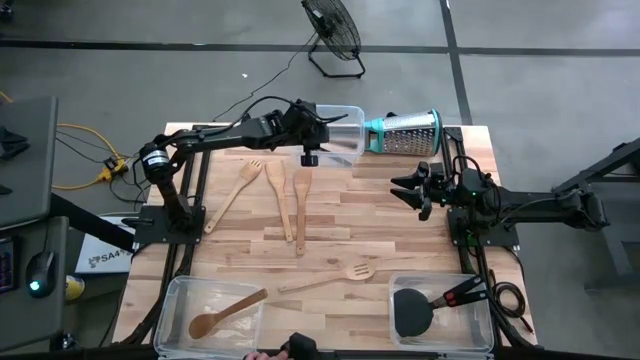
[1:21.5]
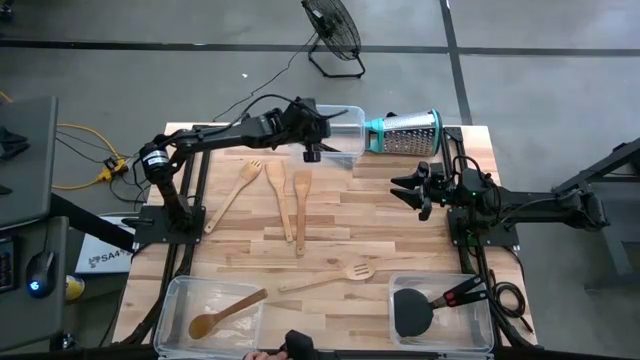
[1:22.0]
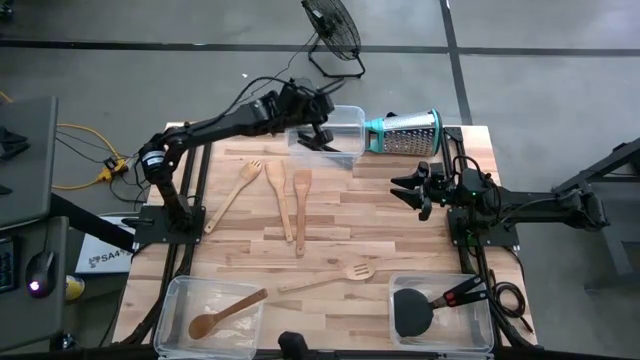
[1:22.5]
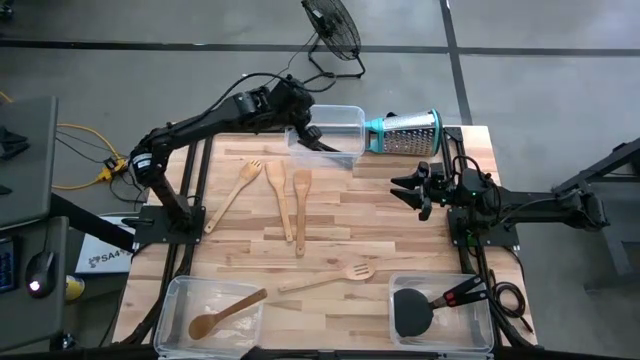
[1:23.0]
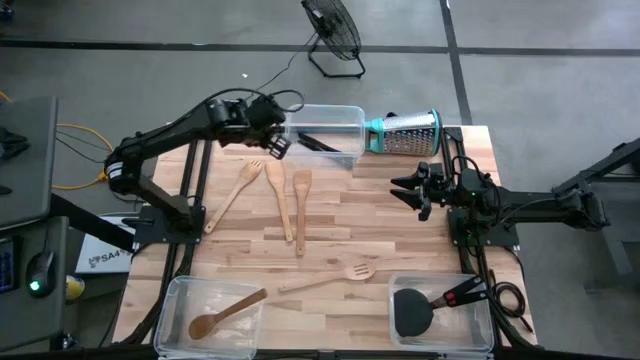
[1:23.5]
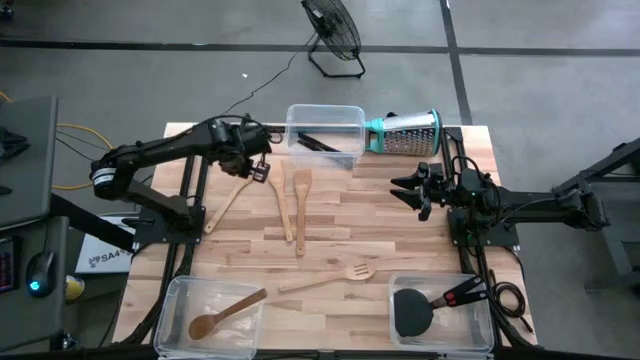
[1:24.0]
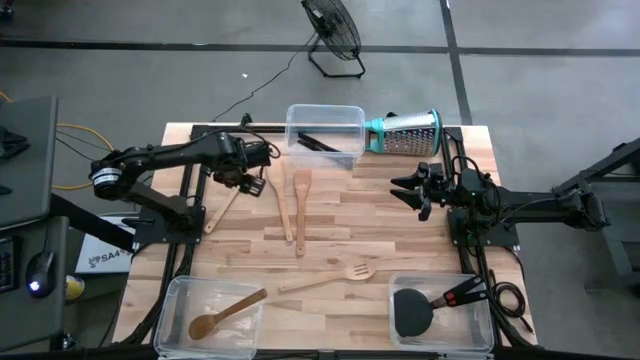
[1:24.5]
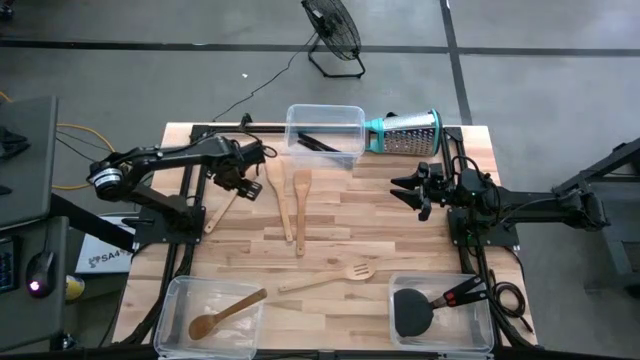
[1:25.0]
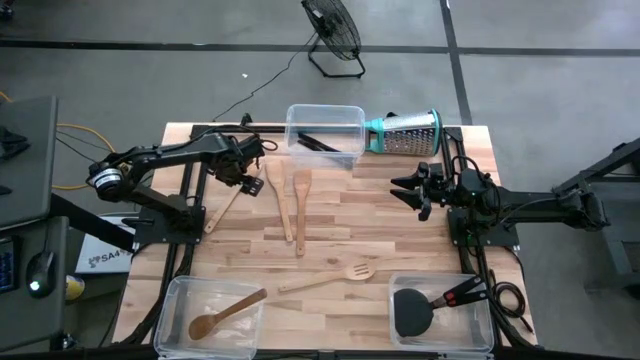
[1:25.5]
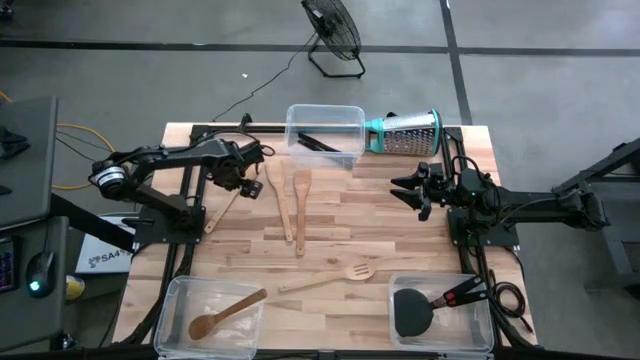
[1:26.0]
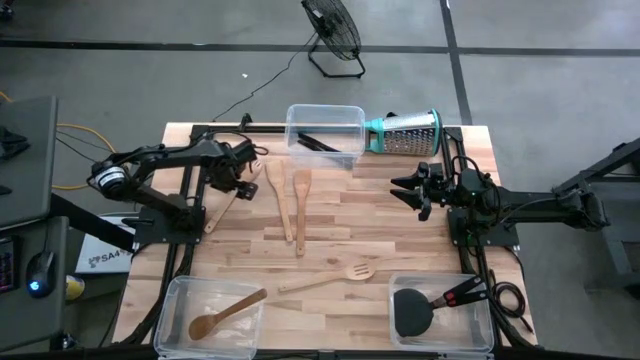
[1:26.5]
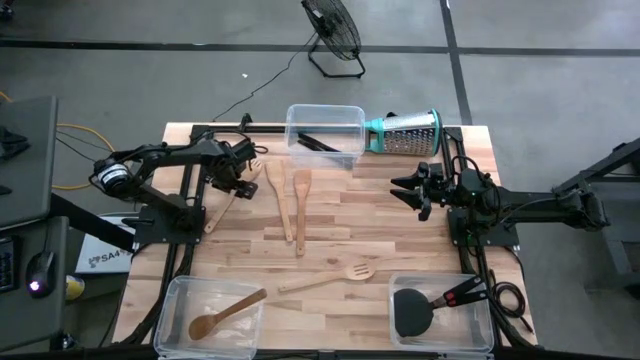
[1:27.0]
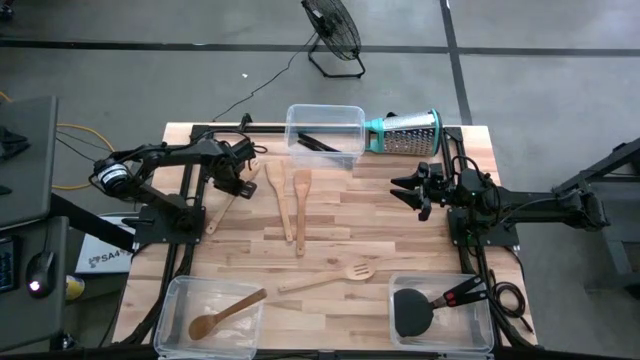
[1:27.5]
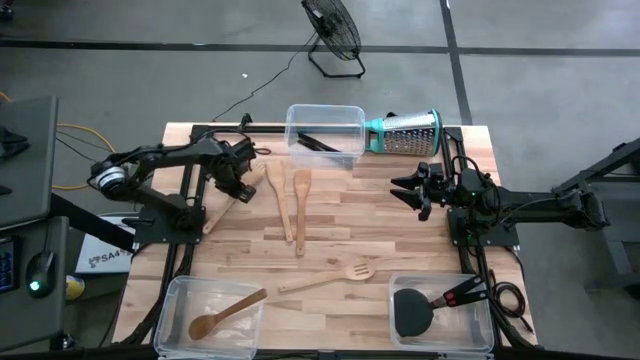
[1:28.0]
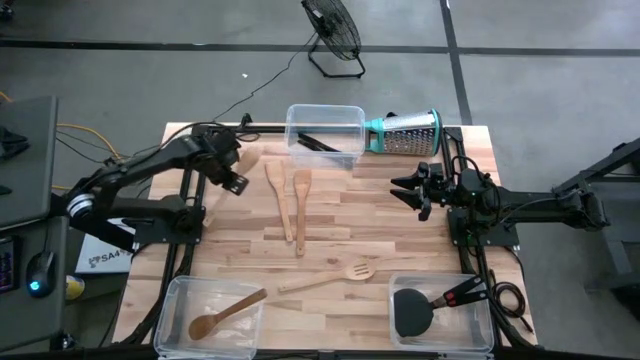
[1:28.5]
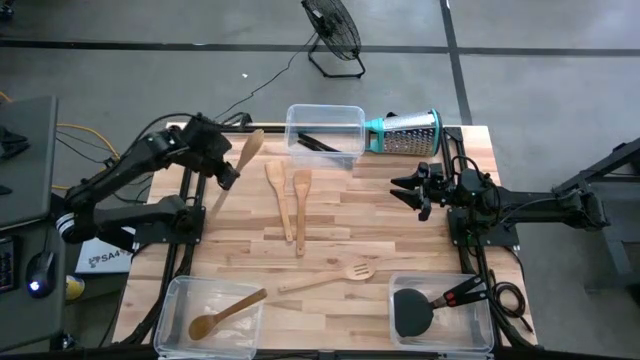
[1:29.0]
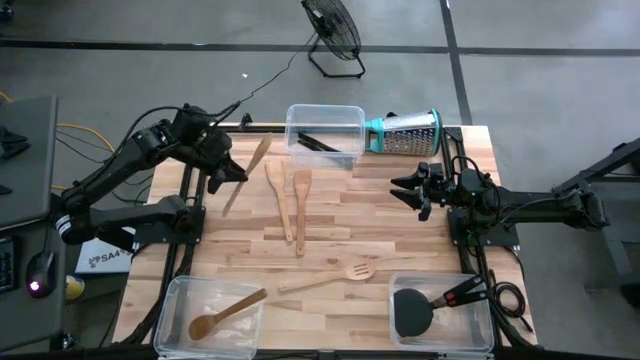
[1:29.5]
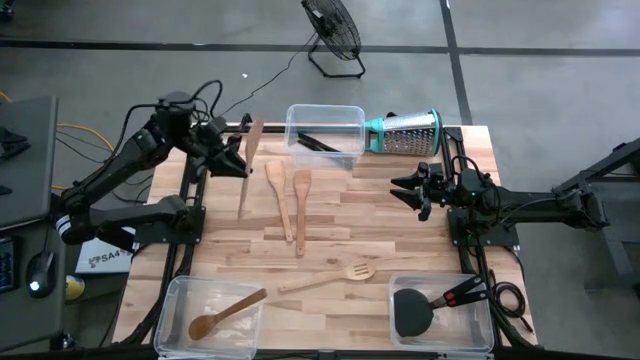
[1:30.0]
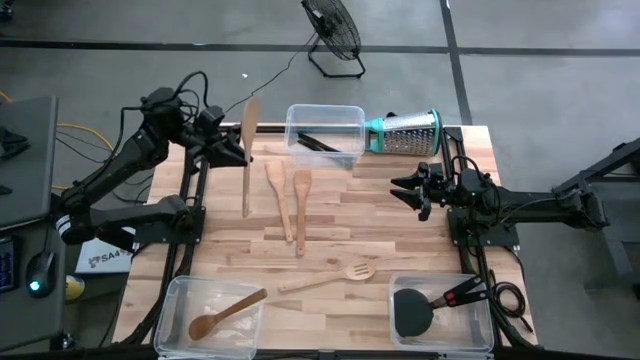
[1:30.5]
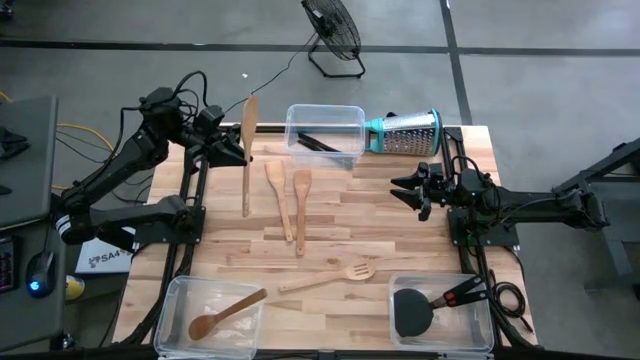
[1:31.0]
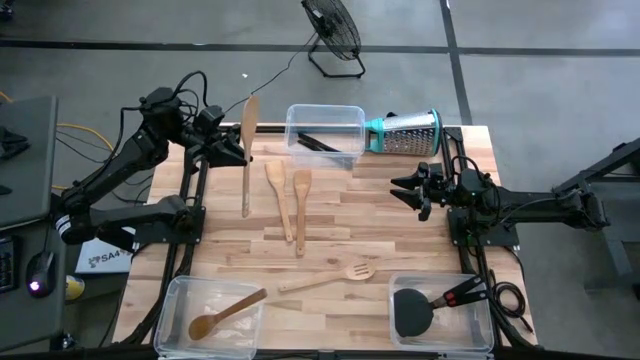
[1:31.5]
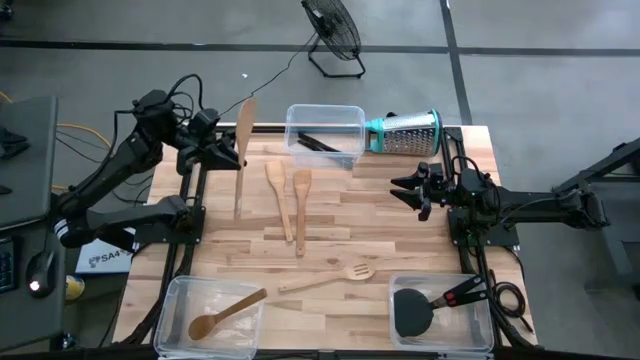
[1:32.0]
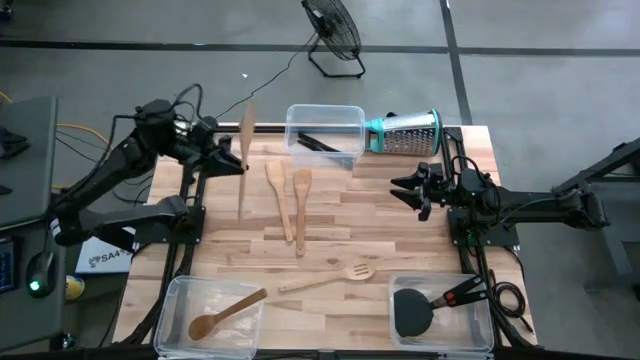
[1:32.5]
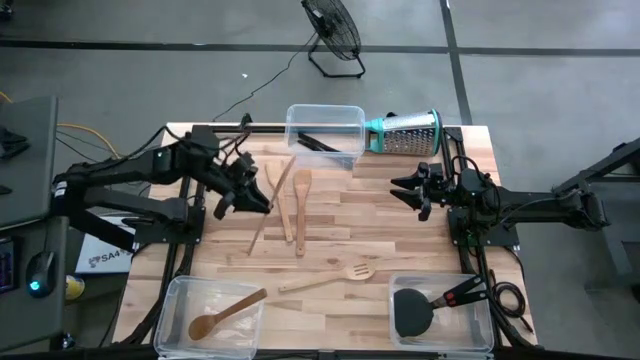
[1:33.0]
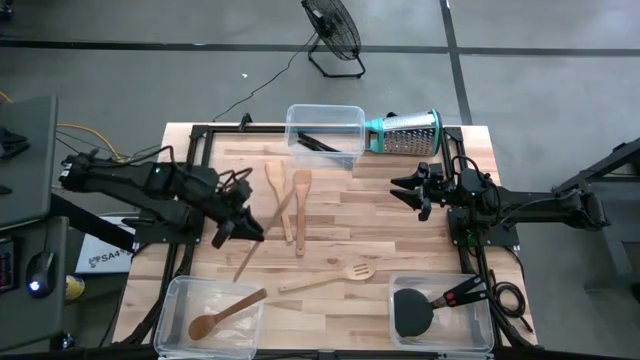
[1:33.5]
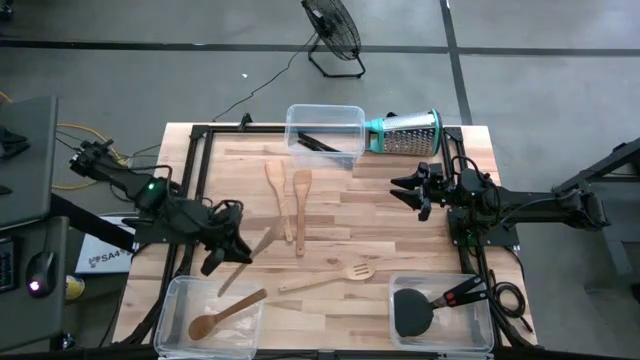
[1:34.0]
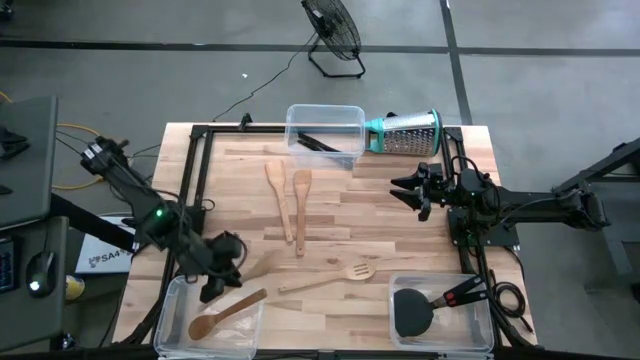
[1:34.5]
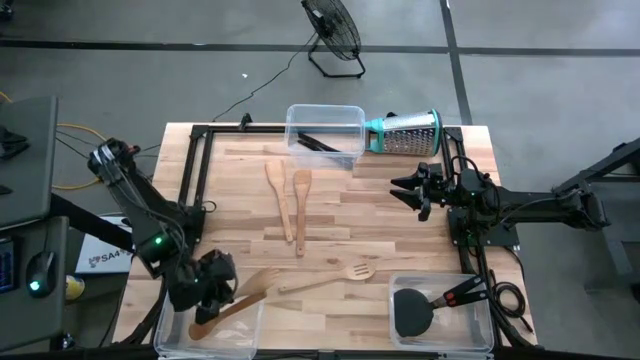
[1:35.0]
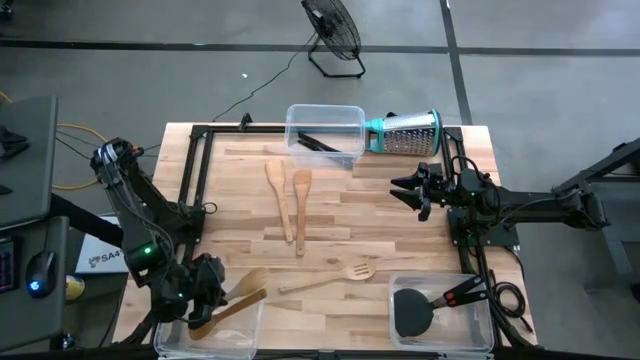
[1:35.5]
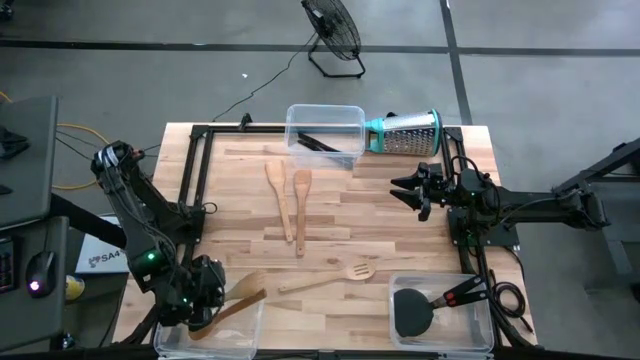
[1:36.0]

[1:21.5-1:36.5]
Task: Pick & Place Kitchen Items
Put the brown serving spoon into the bottom left transparent bin

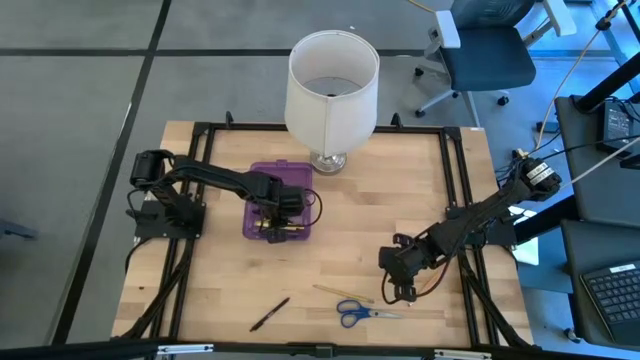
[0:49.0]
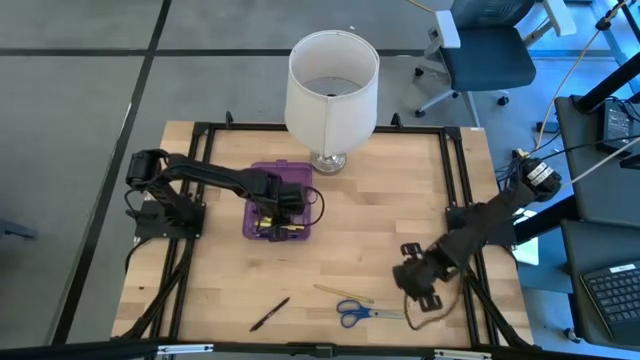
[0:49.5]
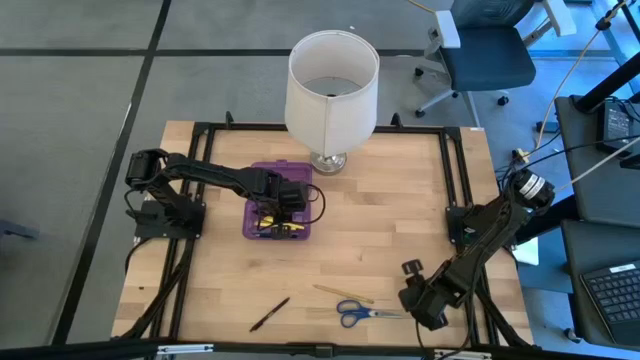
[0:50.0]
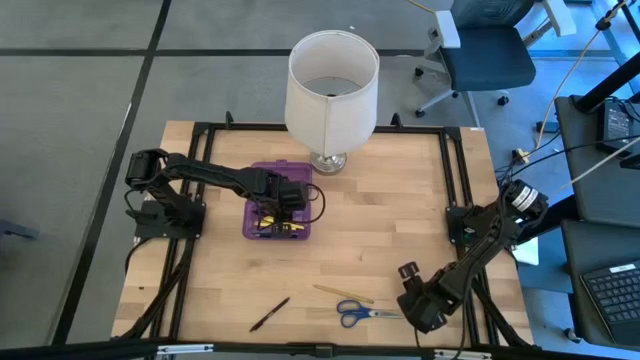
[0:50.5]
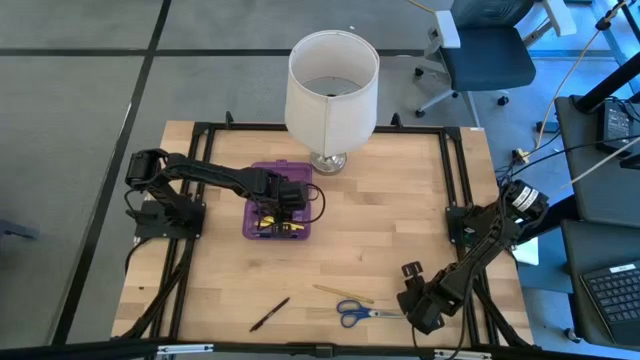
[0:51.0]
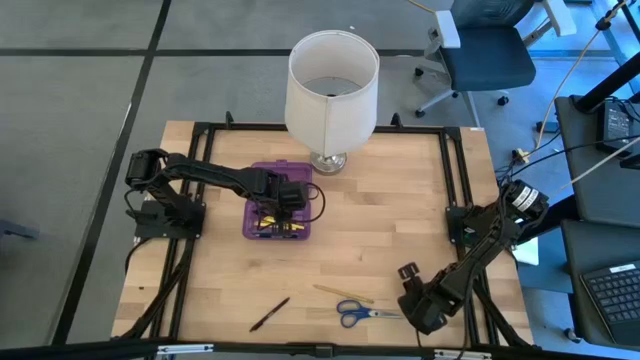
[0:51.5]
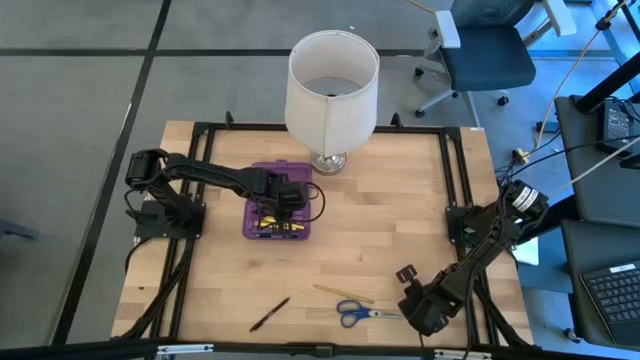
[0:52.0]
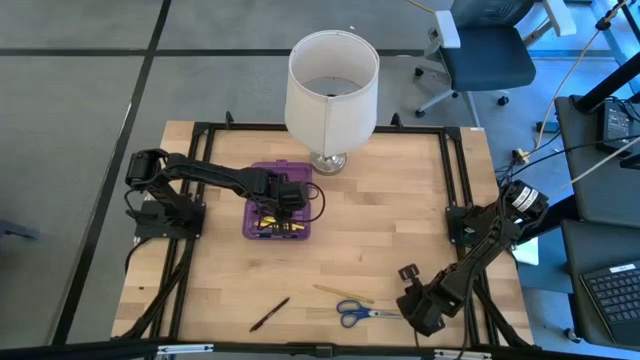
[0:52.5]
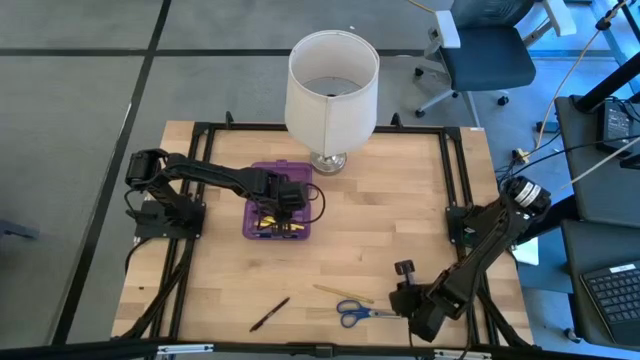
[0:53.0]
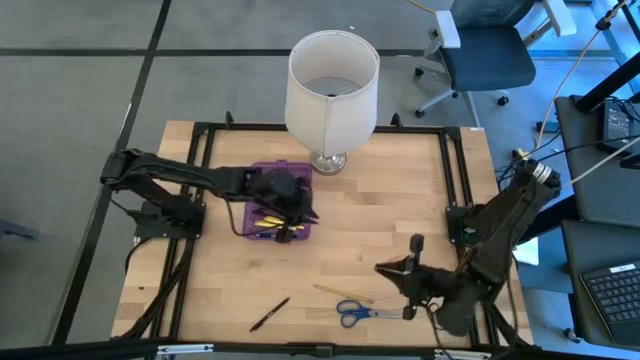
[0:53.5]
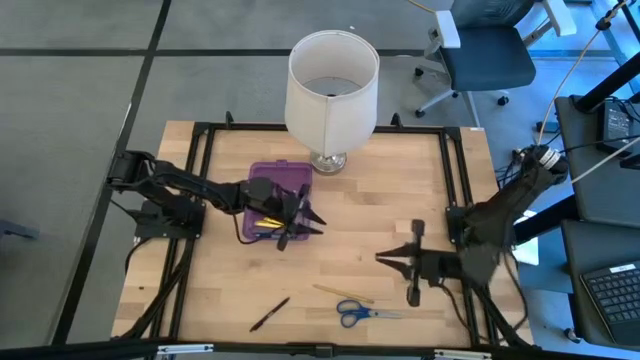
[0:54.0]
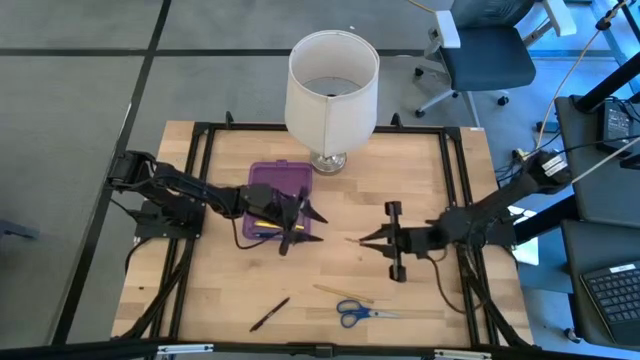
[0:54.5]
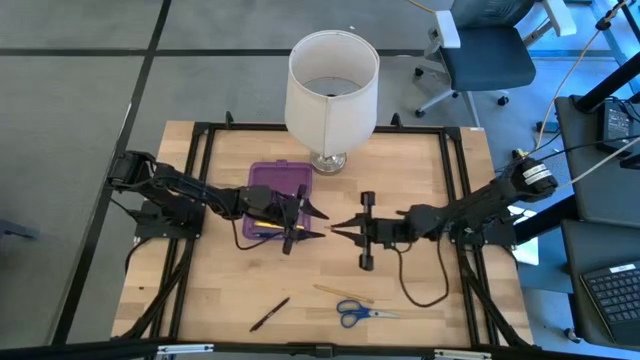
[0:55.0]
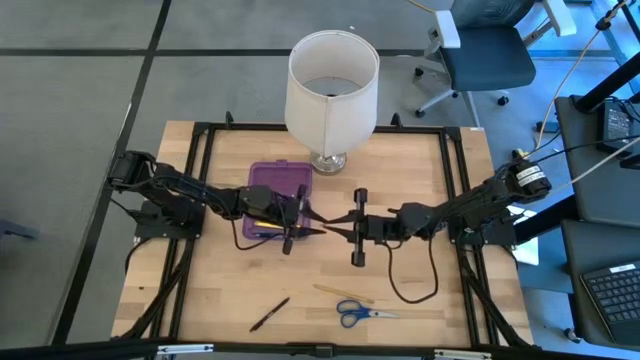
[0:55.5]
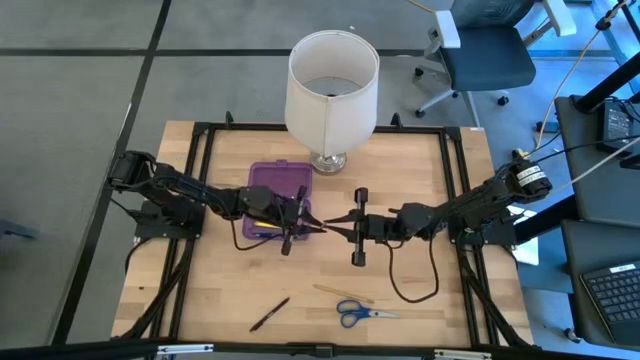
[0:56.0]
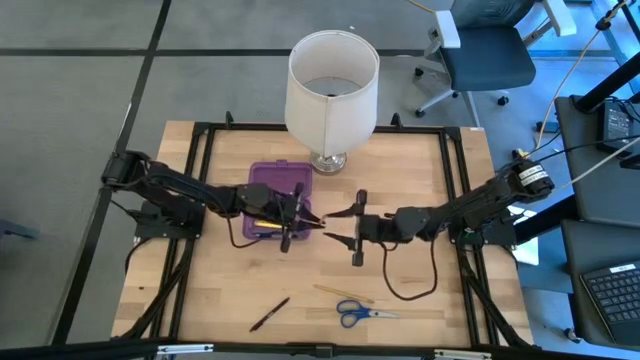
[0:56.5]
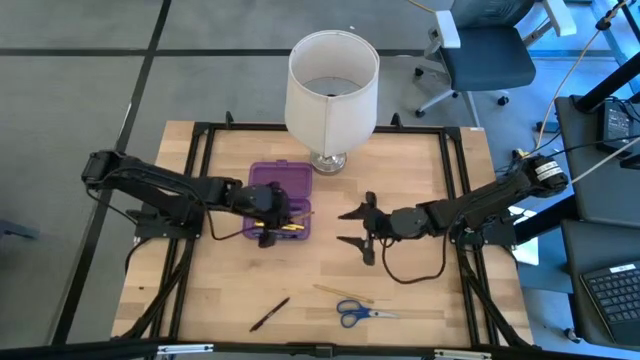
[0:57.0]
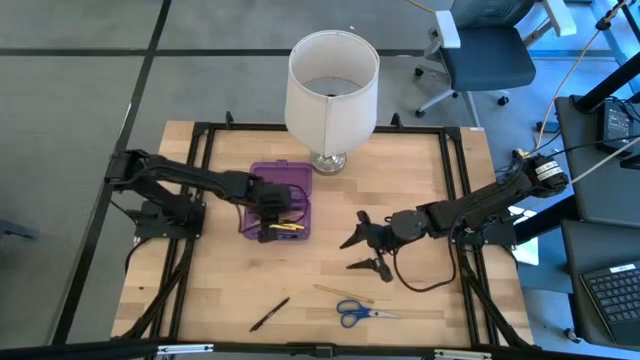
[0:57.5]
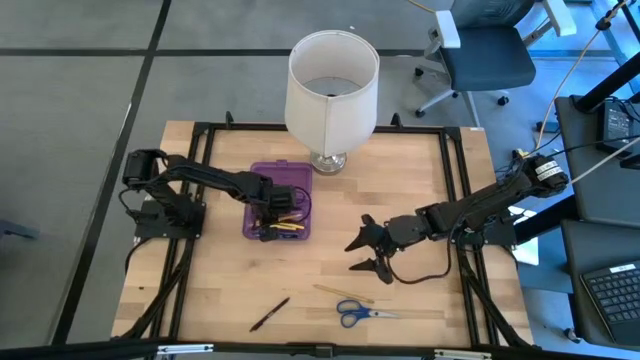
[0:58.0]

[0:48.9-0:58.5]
Task: Pick & place school supplies into a supply box
Put the orange pencil into the purple supply box
